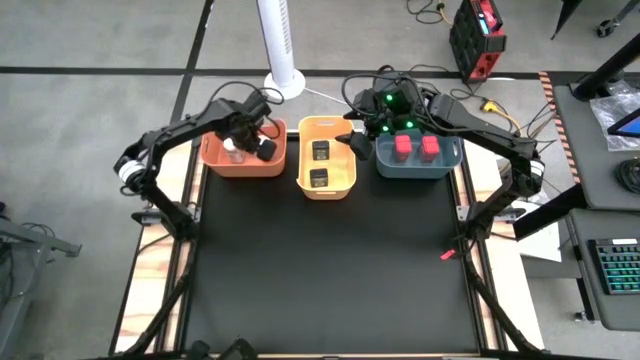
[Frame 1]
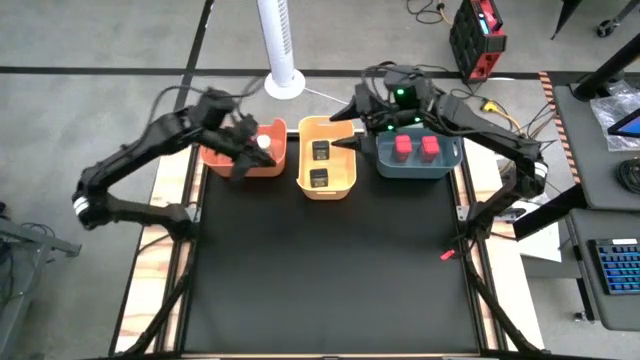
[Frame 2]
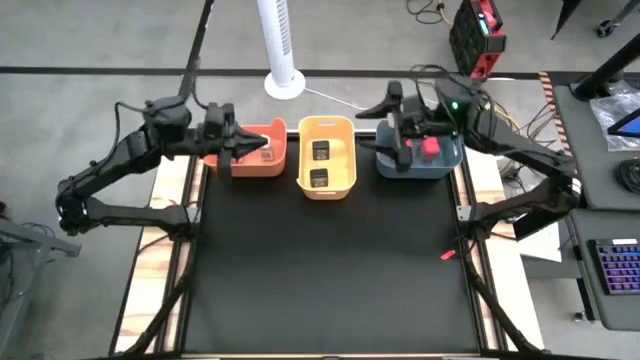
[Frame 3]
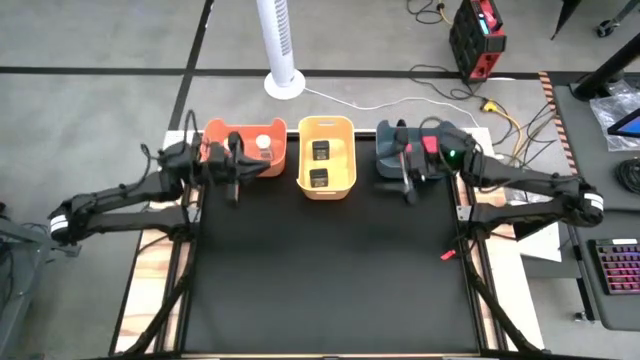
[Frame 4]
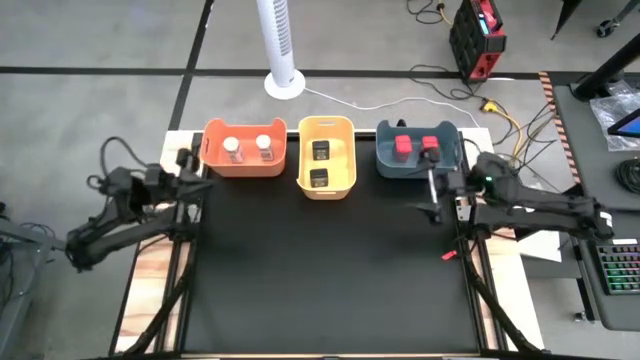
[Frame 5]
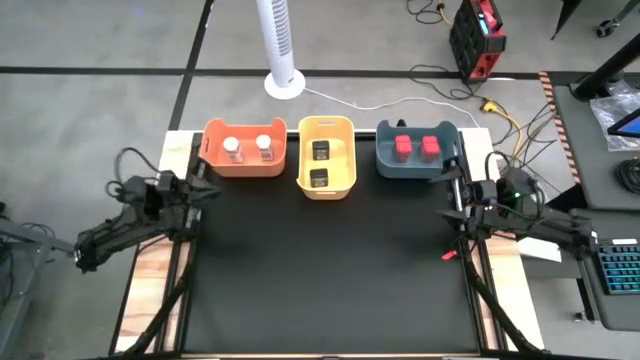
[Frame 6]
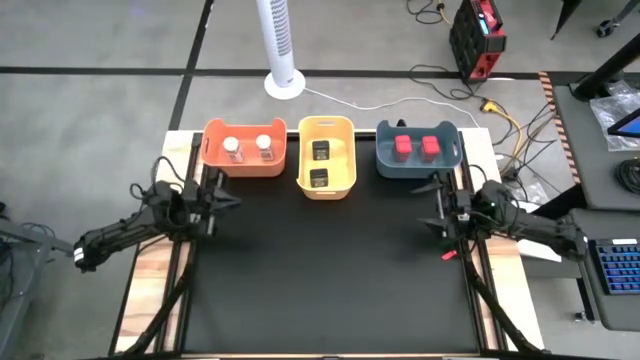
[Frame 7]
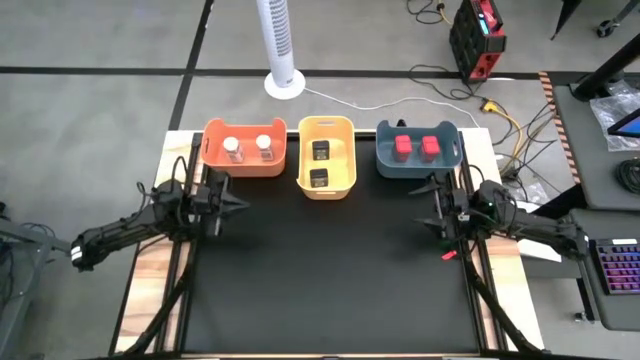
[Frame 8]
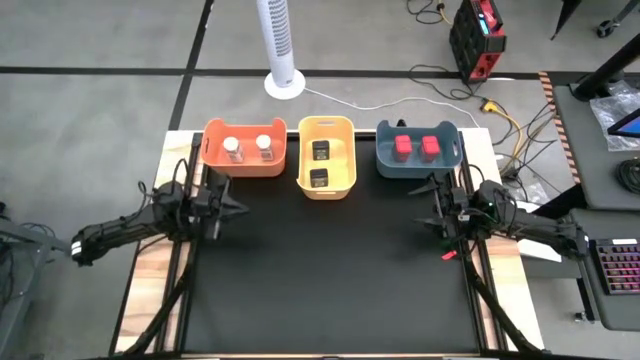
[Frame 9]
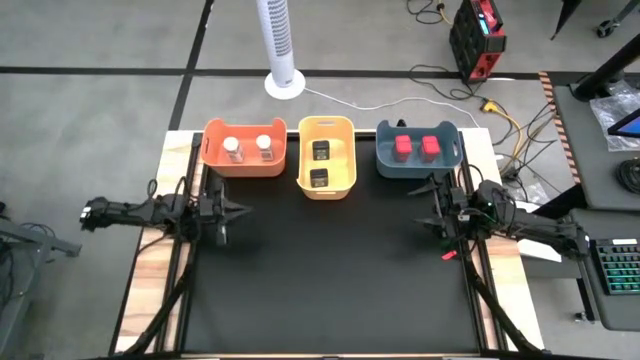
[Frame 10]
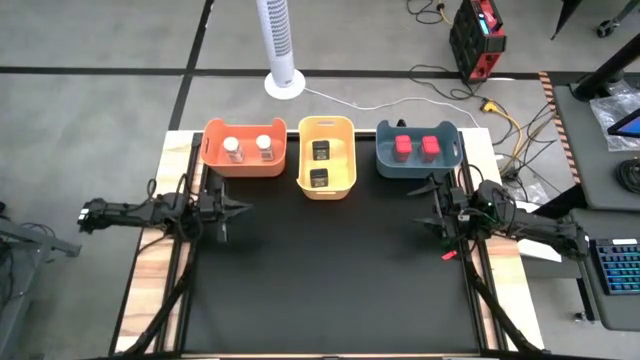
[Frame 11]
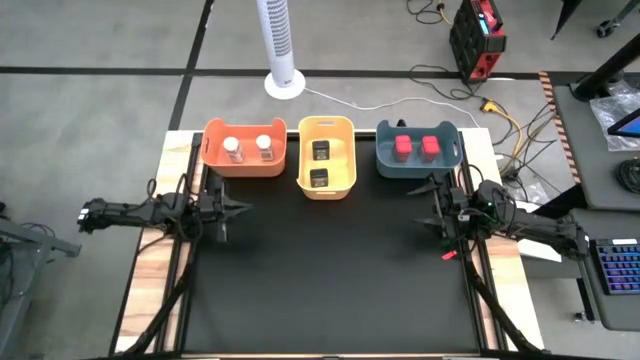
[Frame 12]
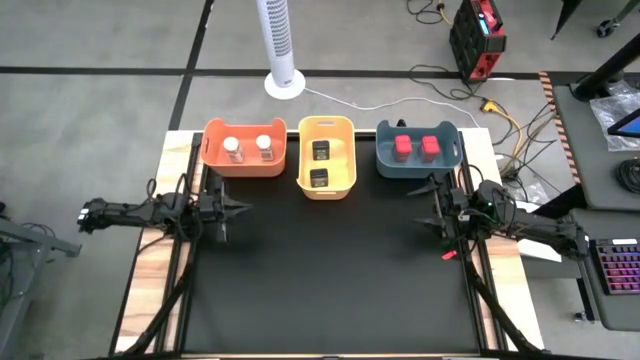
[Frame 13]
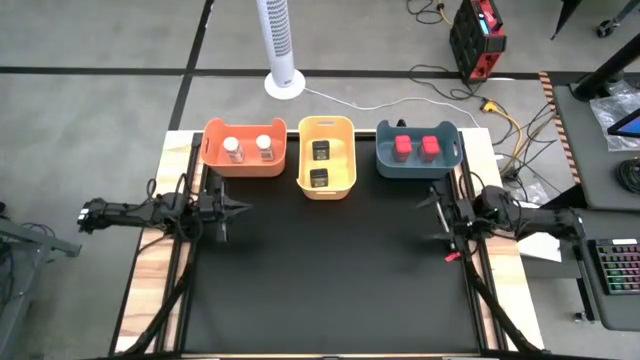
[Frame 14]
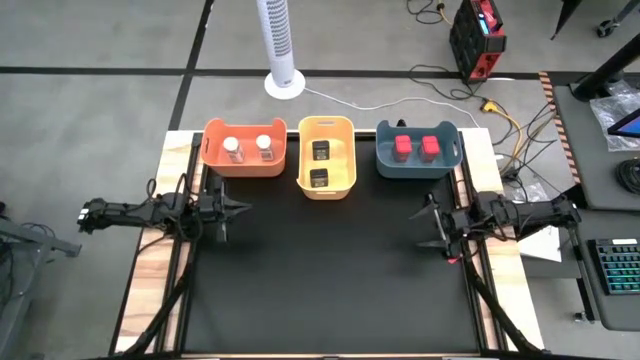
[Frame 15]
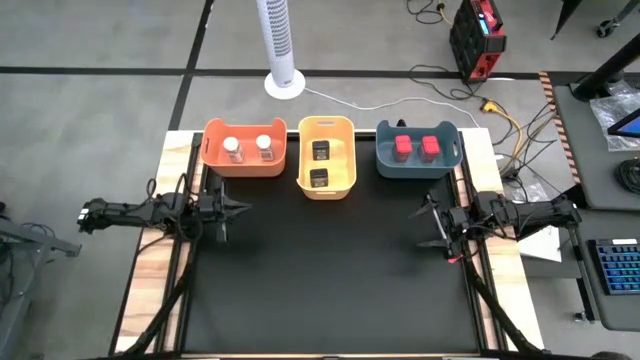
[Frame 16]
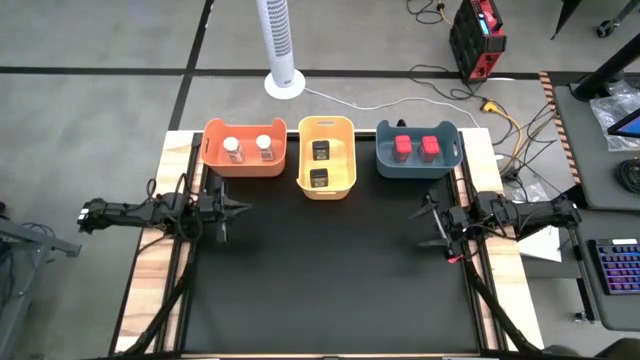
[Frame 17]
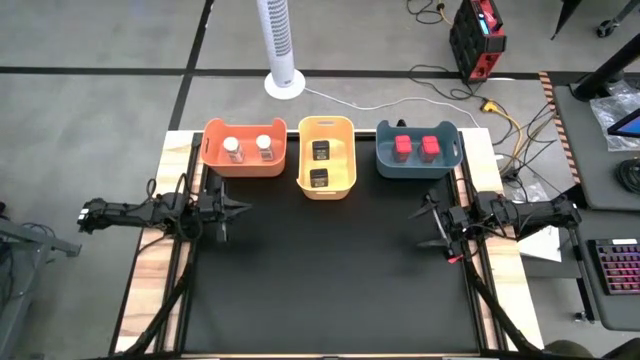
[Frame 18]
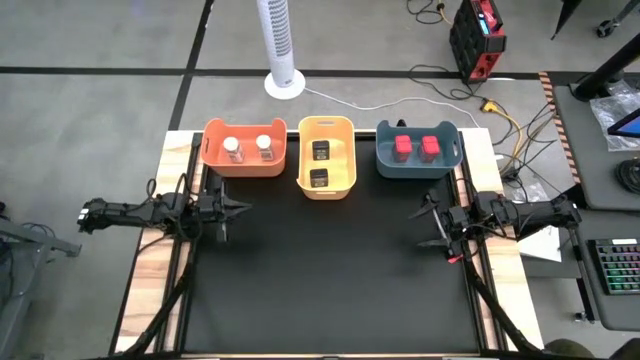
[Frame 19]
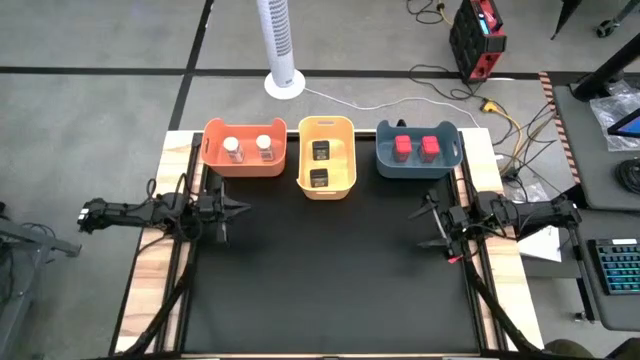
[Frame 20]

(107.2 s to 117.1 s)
Task: Sort spices by type
Return to Home Position

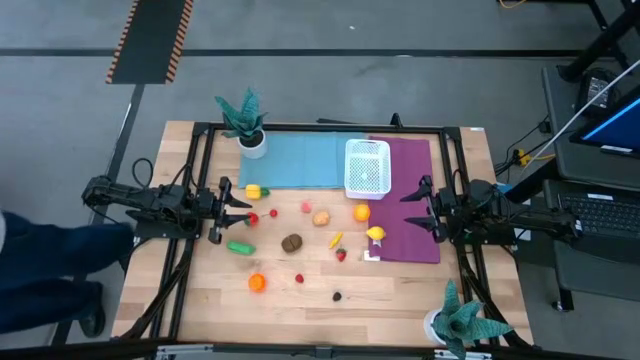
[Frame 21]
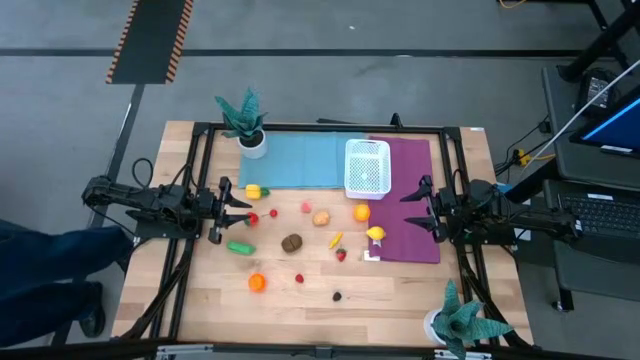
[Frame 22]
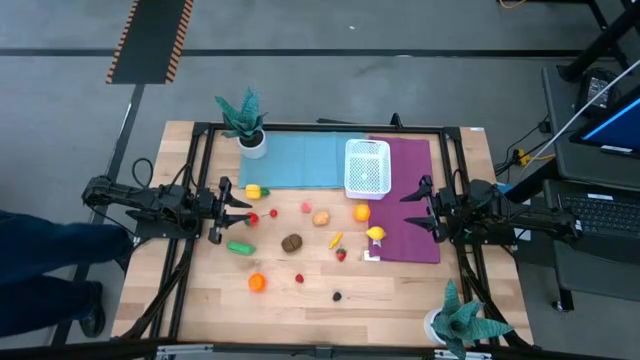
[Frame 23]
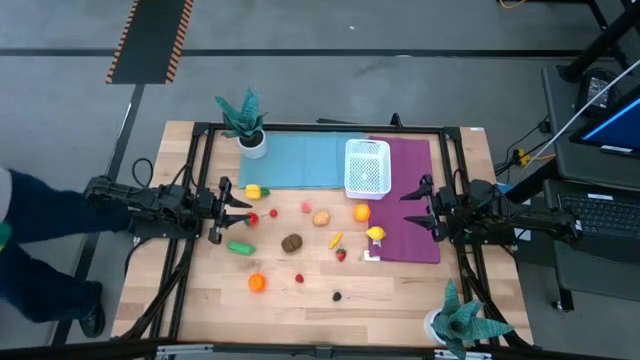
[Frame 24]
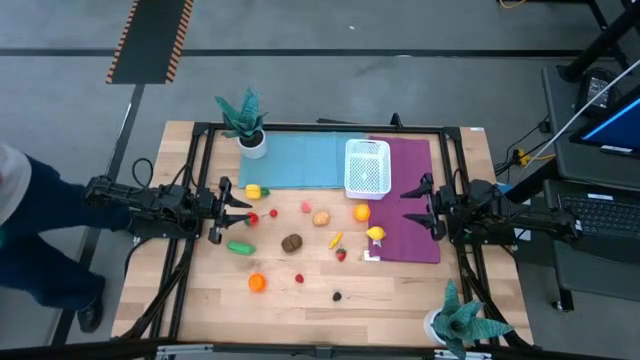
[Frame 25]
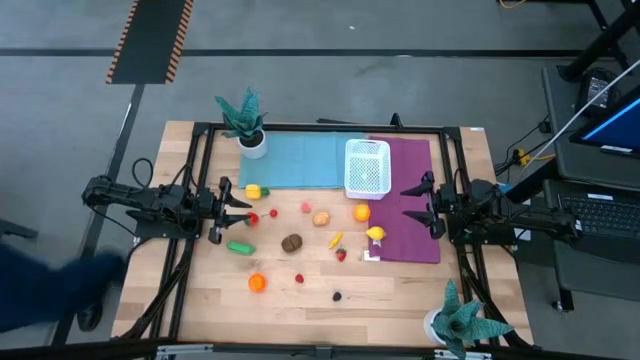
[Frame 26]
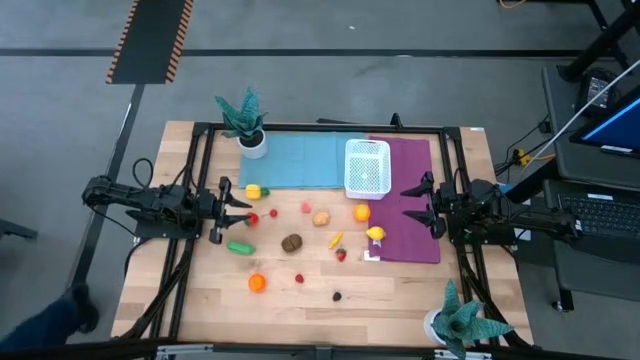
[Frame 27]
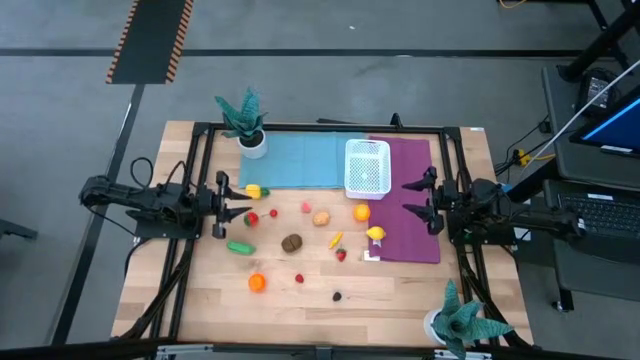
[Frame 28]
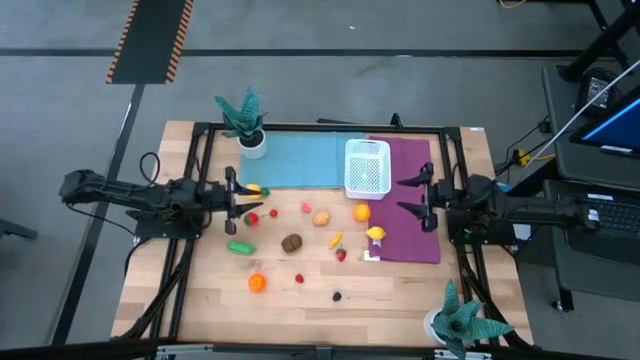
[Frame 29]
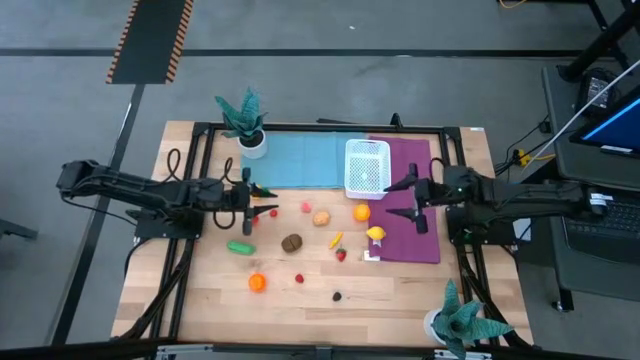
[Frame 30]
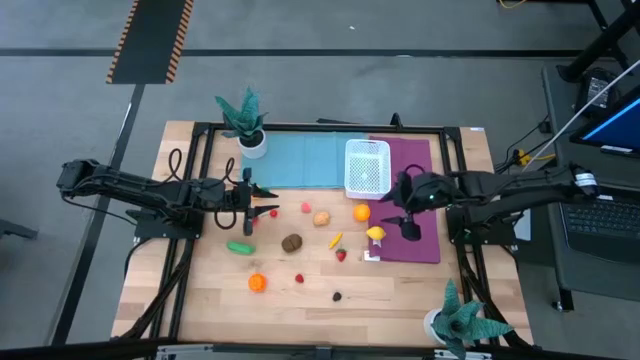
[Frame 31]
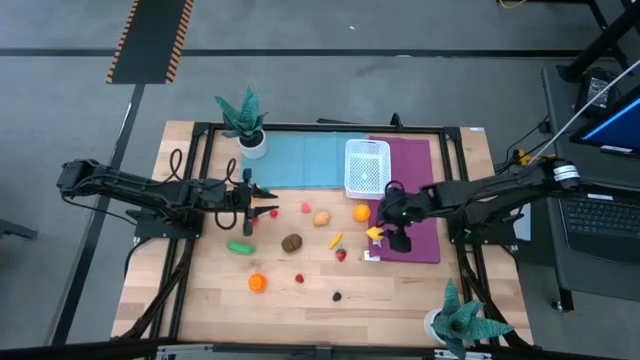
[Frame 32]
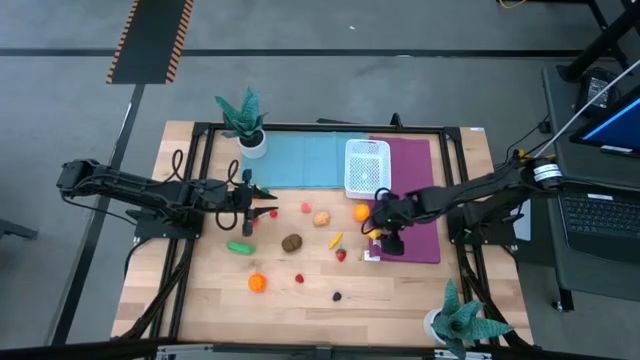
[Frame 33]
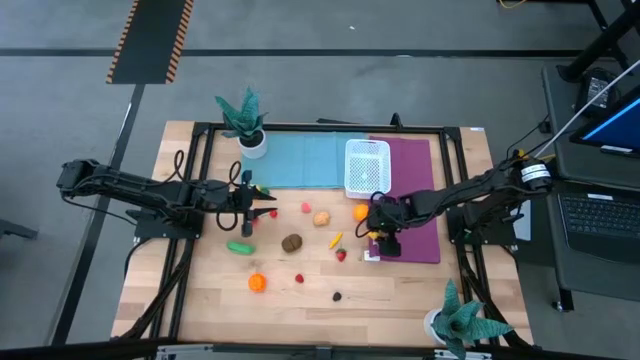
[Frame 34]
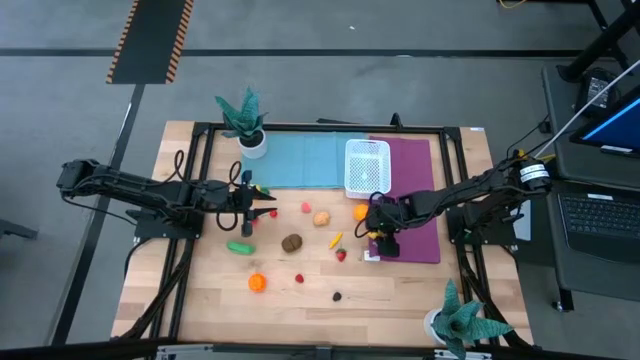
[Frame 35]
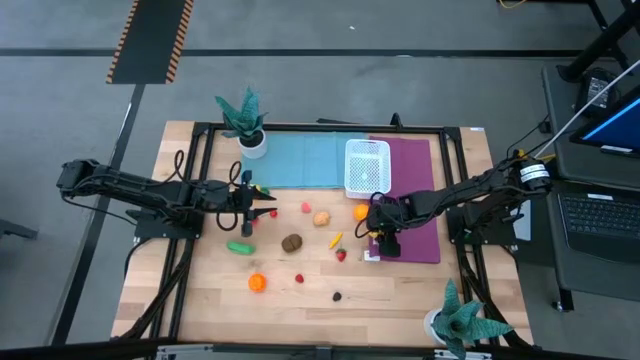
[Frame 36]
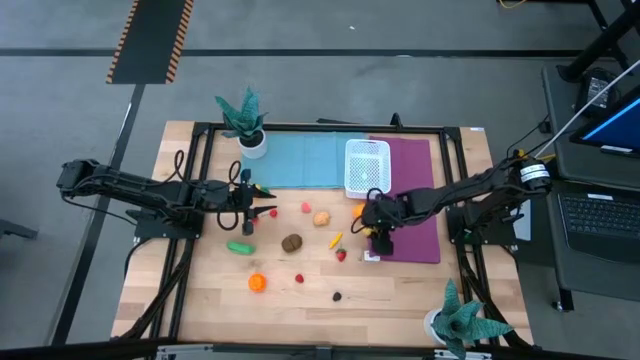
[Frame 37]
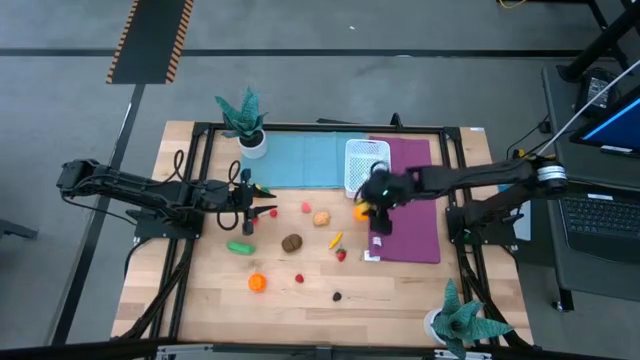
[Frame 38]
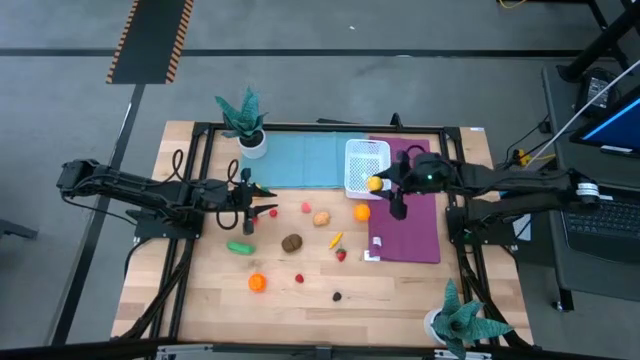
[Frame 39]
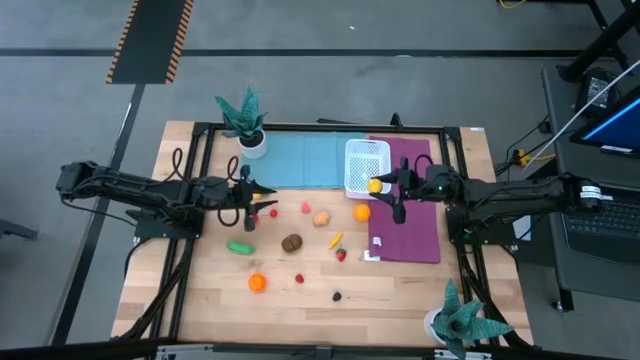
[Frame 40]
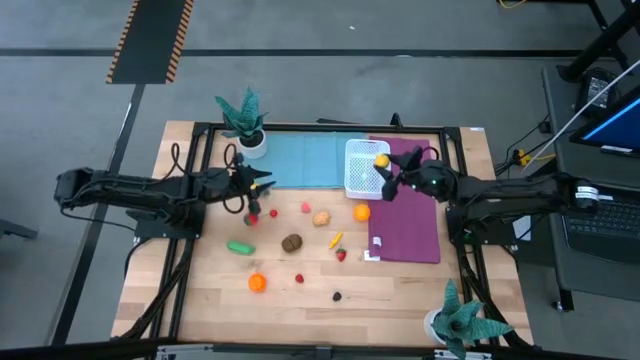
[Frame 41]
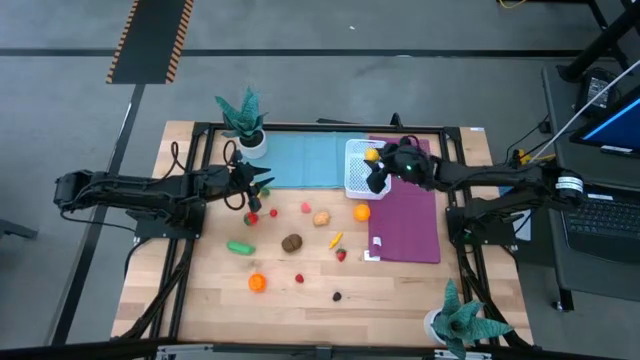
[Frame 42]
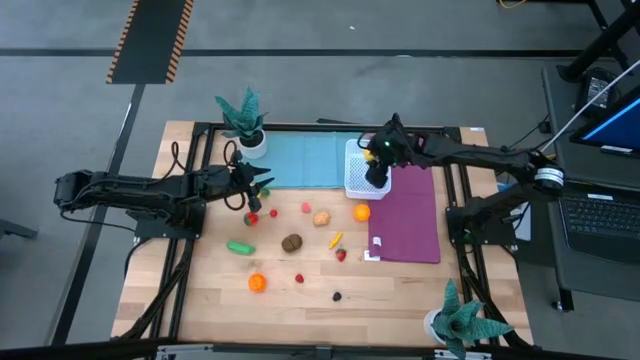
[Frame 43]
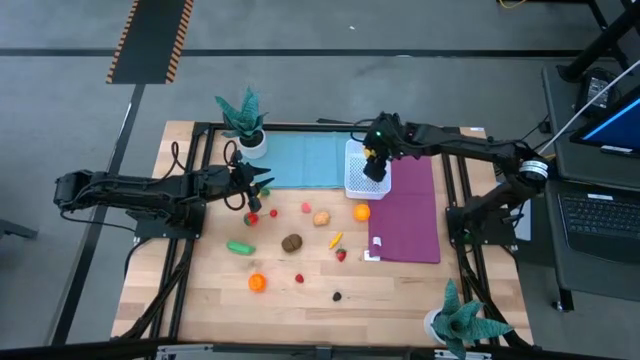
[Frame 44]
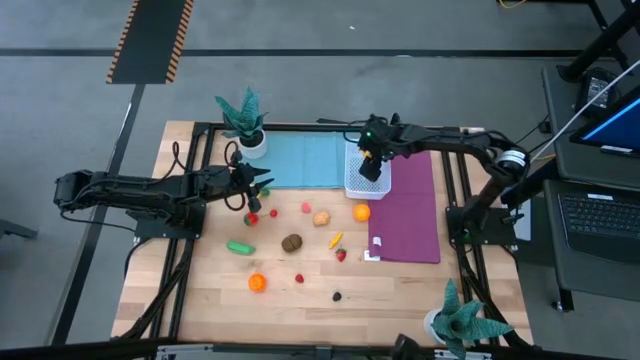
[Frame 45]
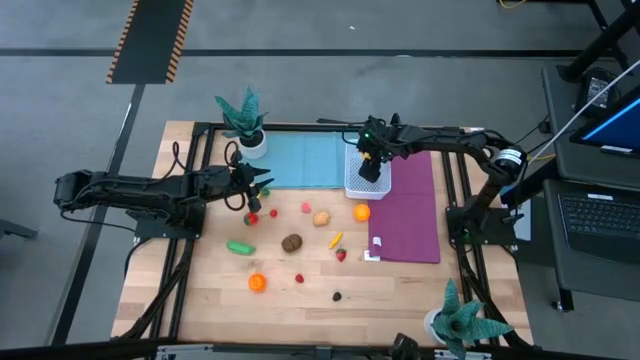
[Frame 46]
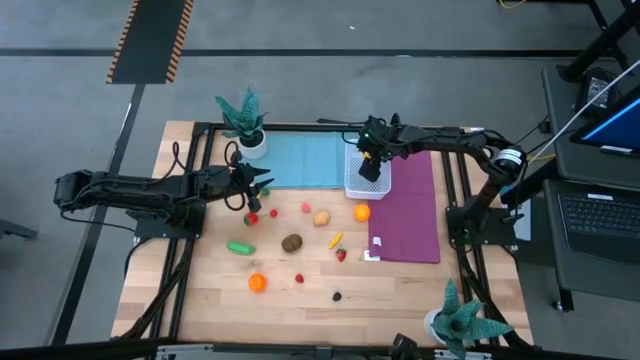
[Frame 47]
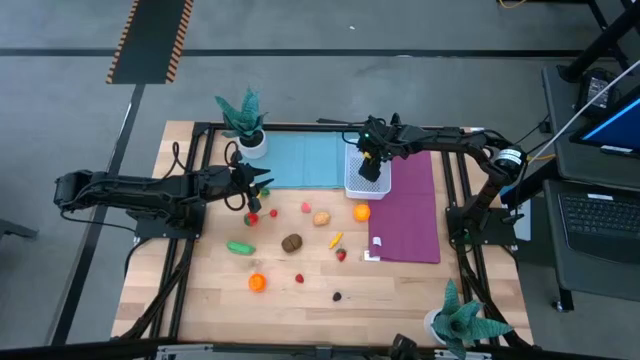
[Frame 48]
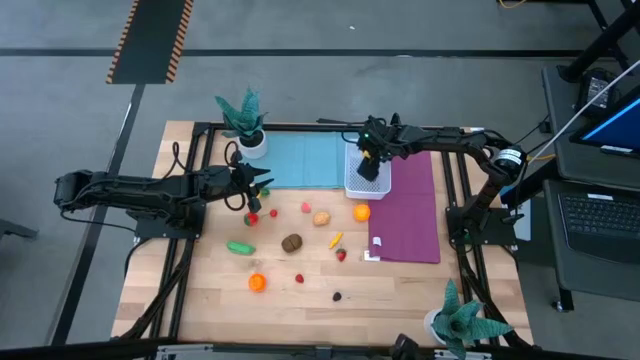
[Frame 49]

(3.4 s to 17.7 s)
Task: Pick and placing Produce into tupperware
Put the yellow lemon into the white container
